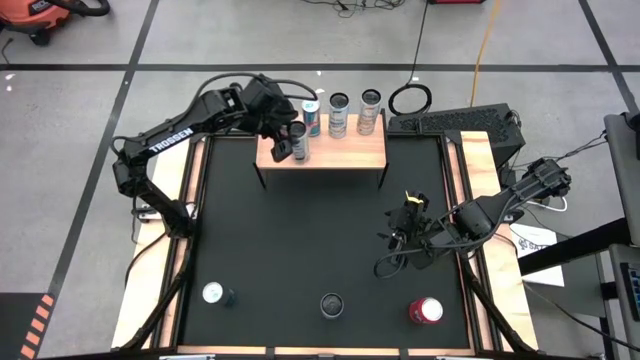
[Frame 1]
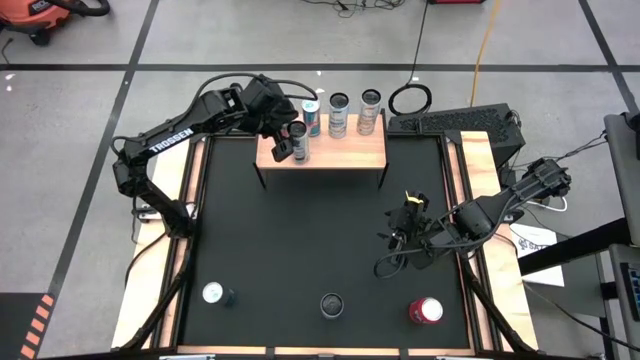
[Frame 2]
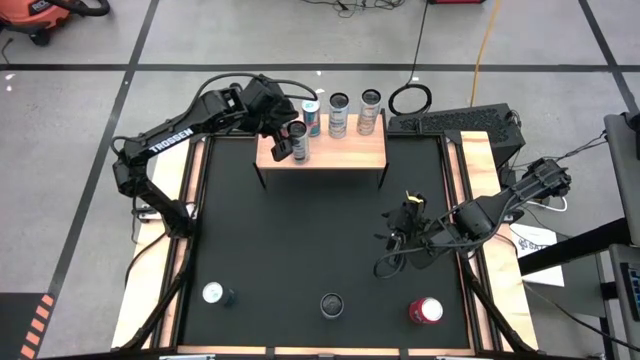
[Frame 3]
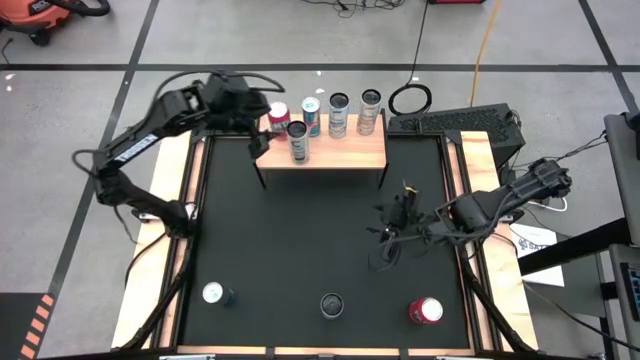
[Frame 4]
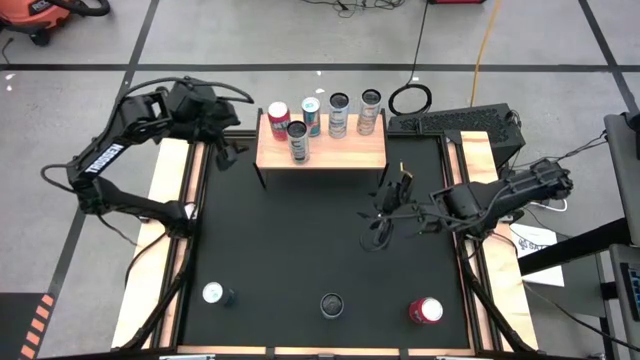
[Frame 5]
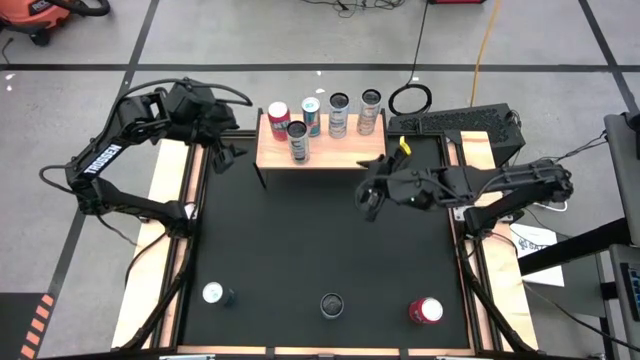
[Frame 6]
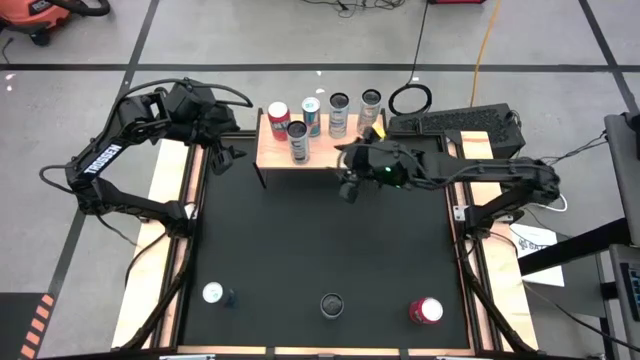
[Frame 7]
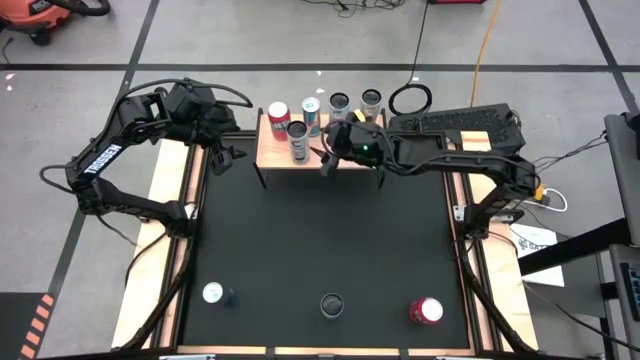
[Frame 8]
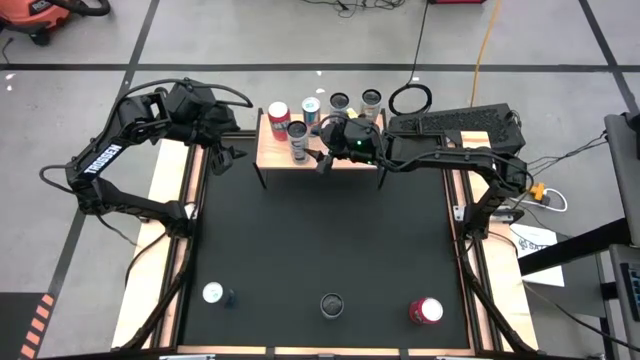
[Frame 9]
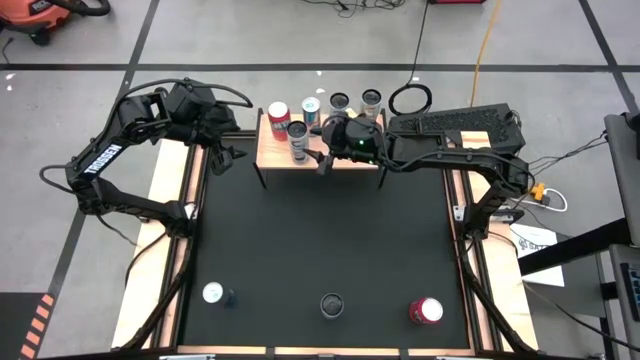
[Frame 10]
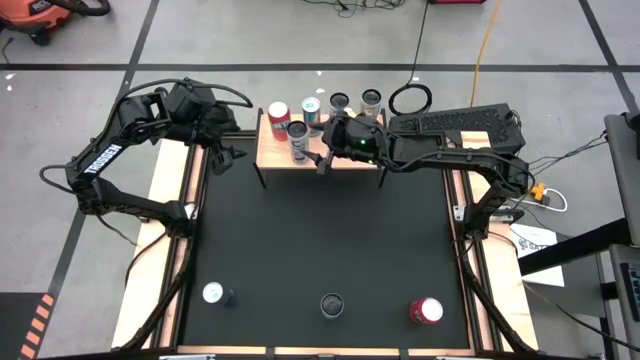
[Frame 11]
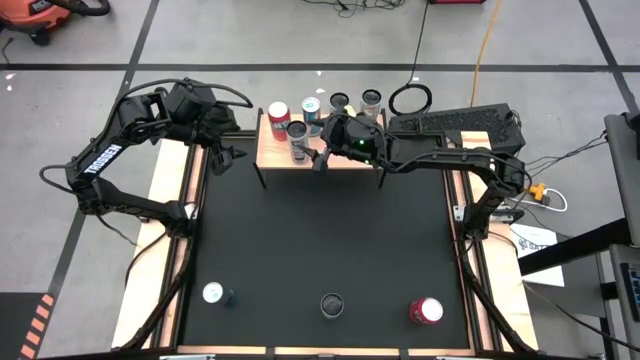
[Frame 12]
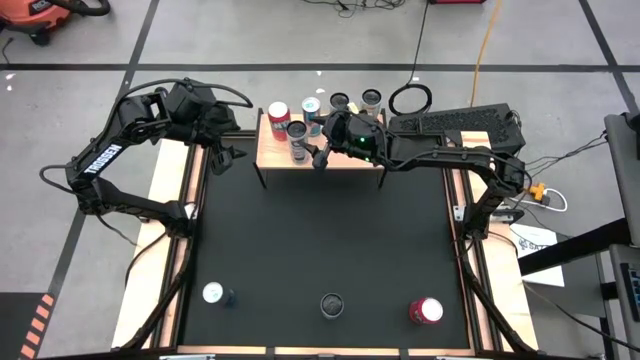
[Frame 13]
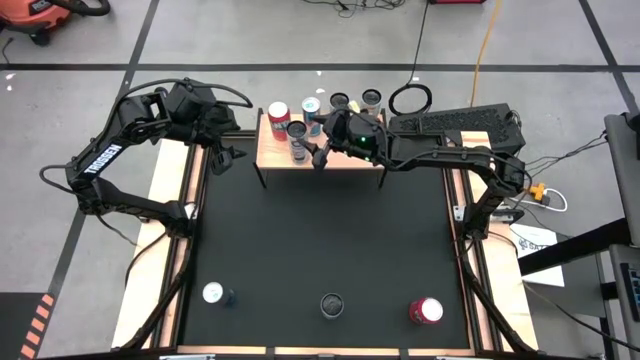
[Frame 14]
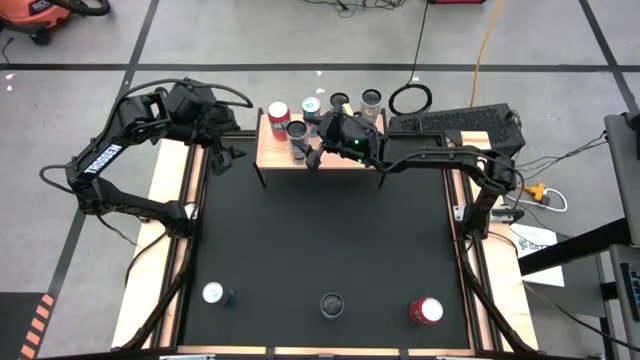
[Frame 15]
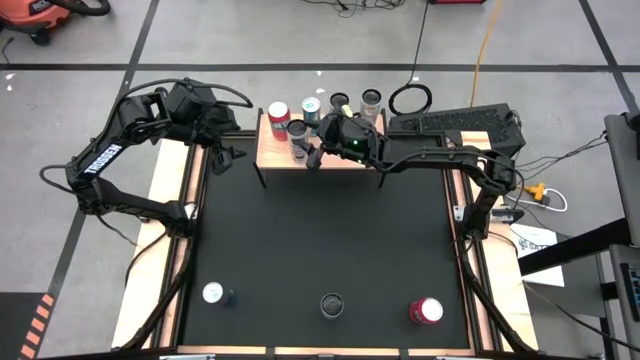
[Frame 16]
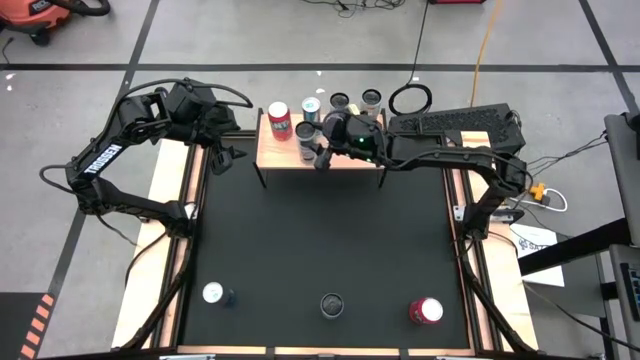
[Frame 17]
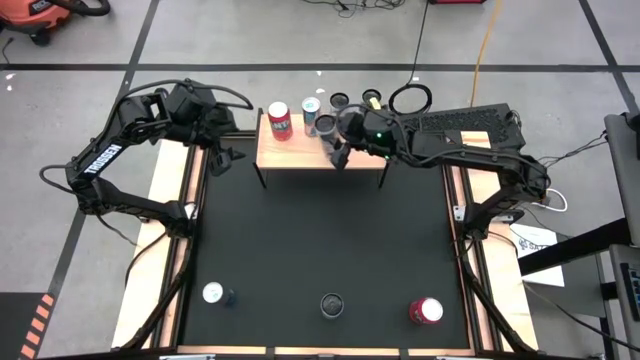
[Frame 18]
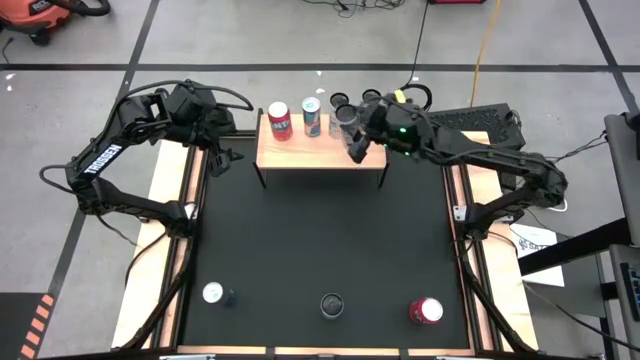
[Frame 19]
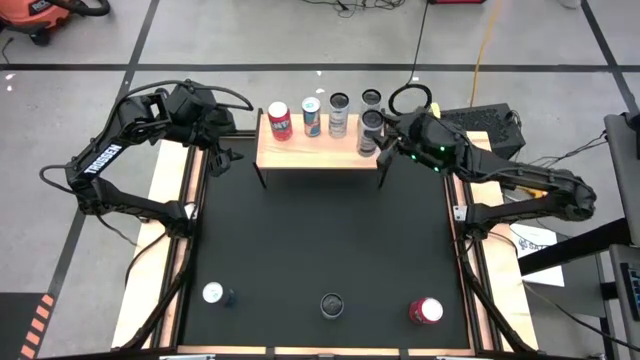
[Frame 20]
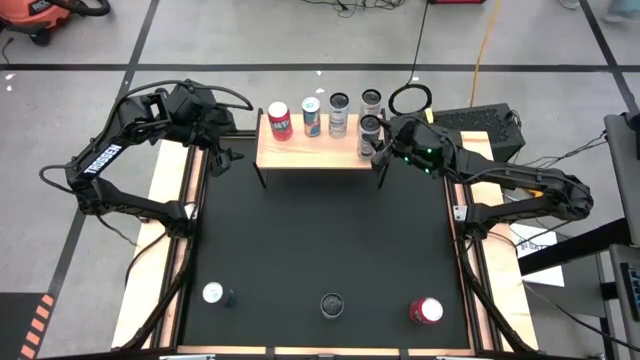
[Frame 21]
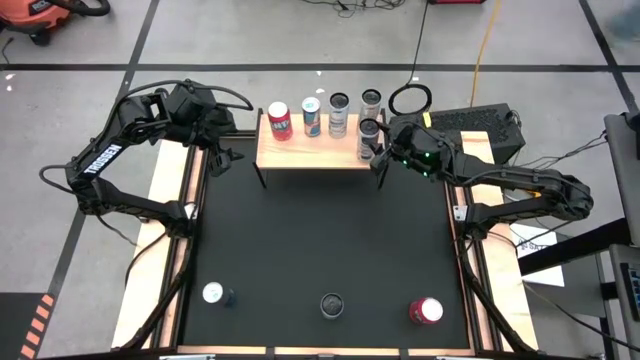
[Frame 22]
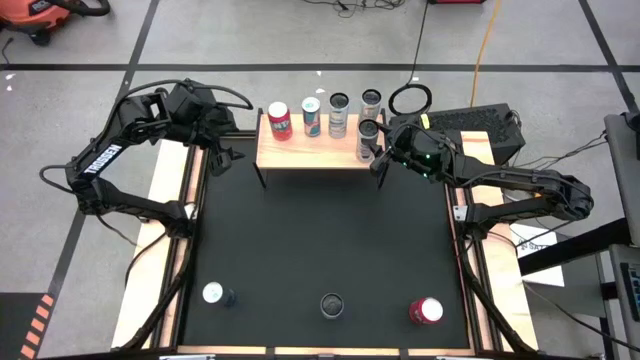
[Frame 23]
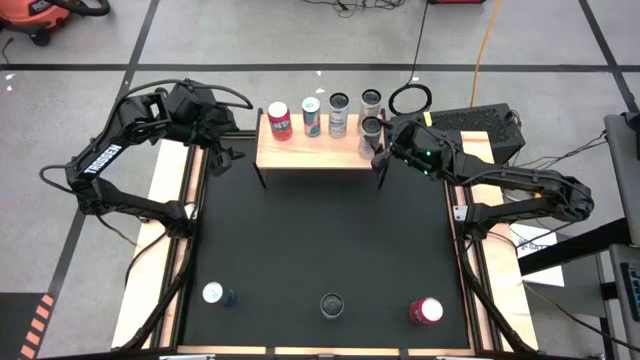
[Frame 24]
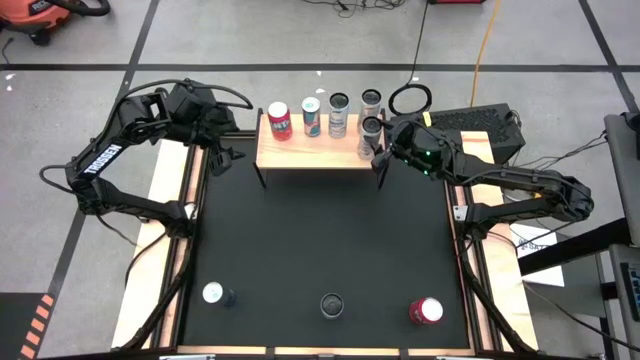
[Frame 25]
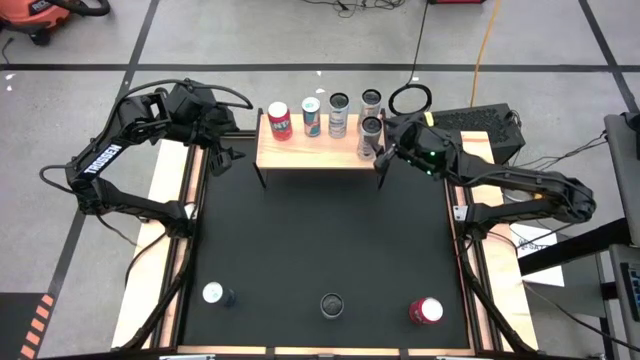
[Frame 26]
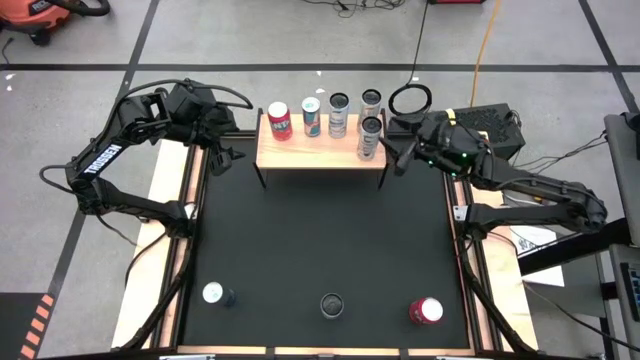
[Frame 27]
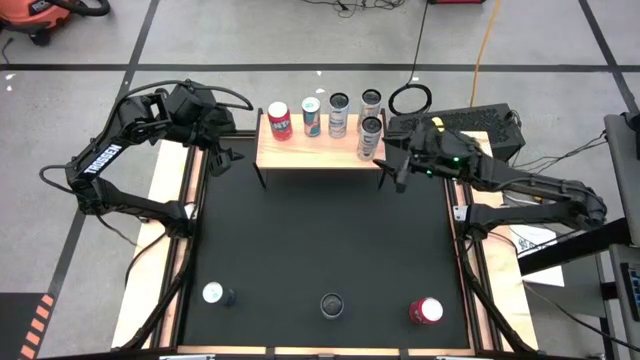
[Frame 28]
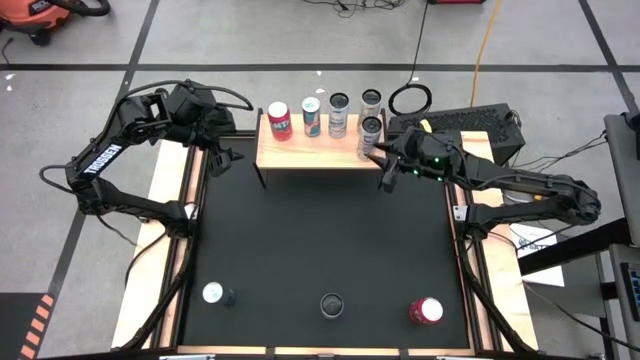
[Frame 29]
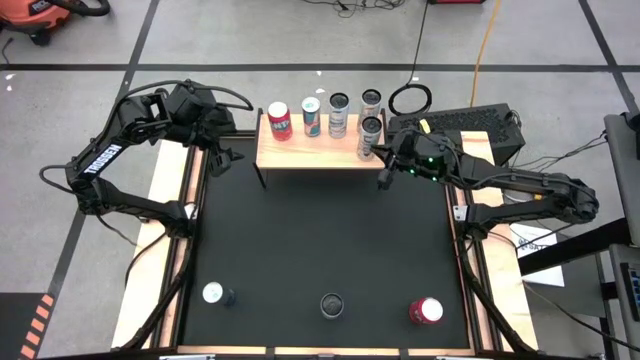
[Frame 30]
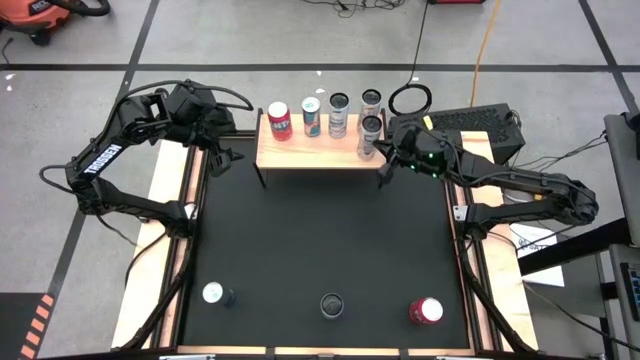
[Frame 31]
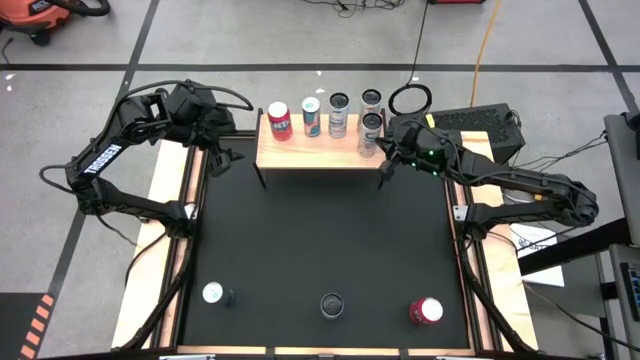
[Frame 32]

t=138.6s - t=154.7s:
Task: Place canned beverage on shelf
Put the white-yellow soda can on the shelf aligned with the other white-yellow soda can

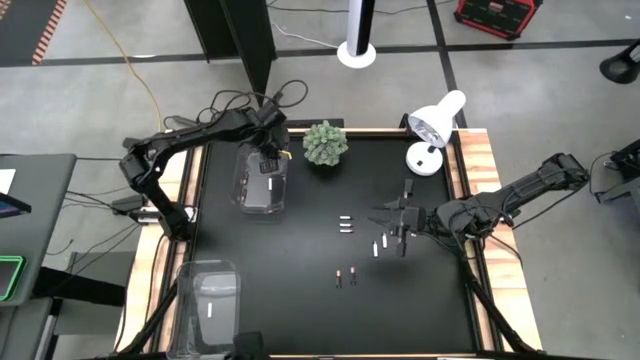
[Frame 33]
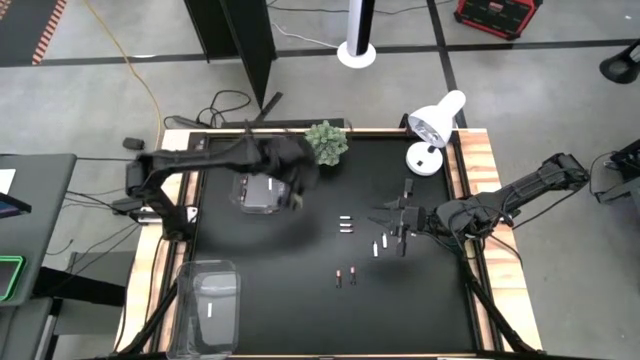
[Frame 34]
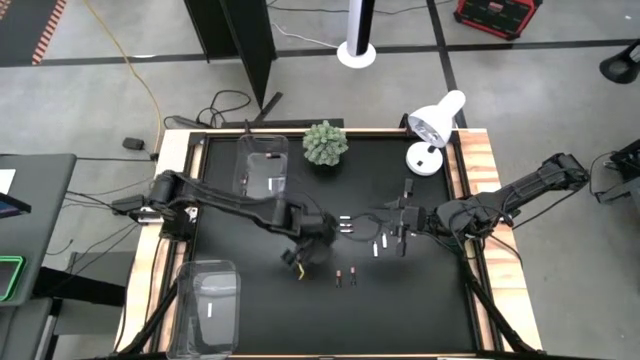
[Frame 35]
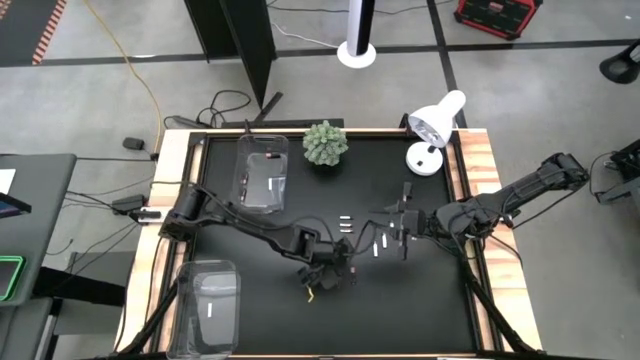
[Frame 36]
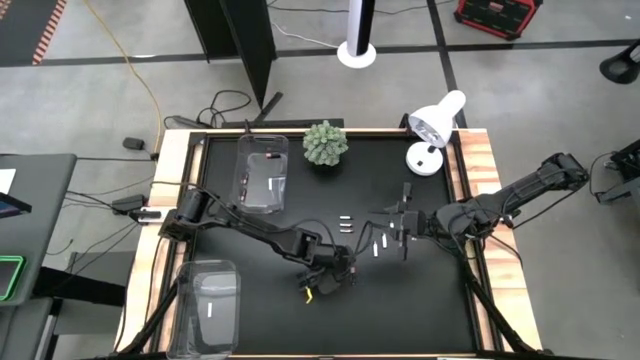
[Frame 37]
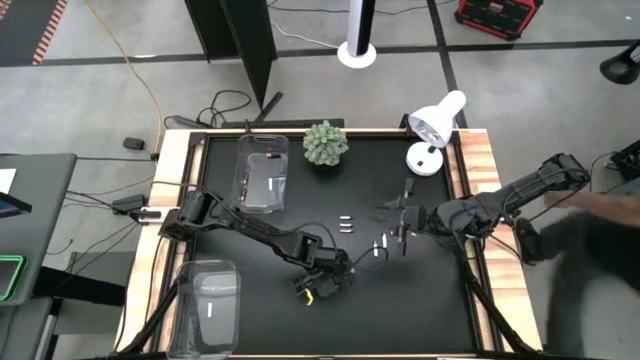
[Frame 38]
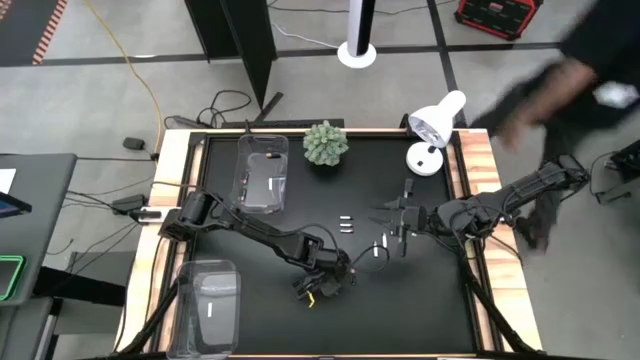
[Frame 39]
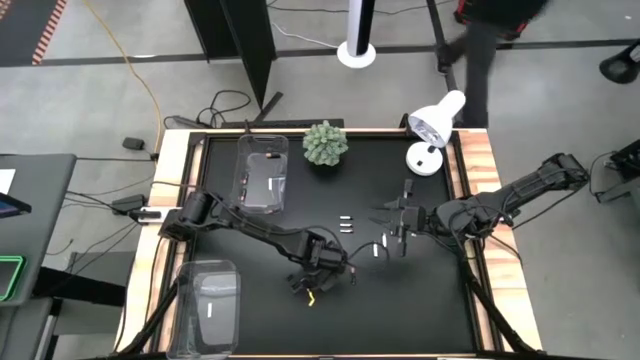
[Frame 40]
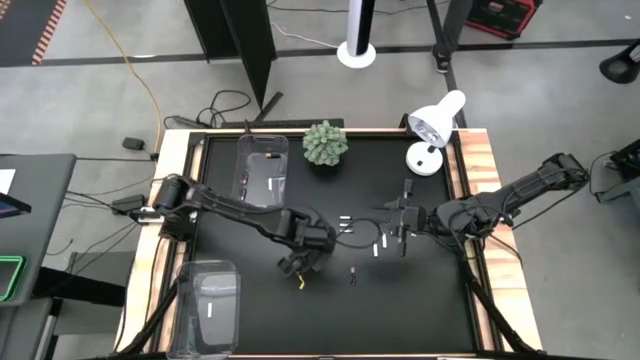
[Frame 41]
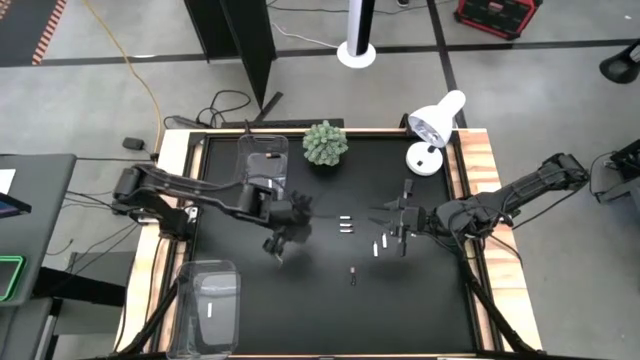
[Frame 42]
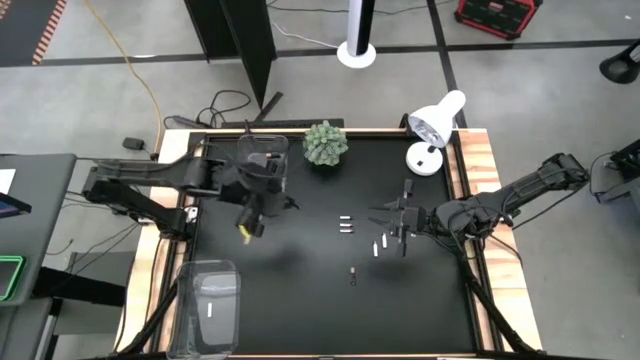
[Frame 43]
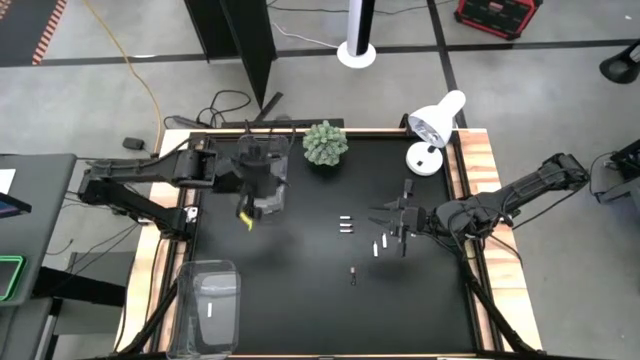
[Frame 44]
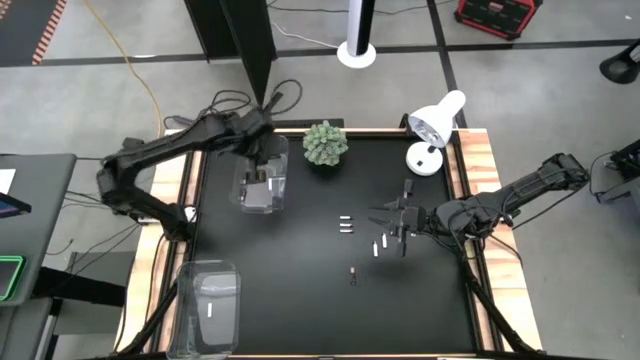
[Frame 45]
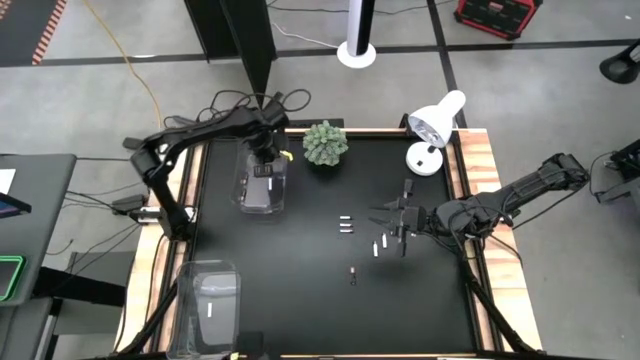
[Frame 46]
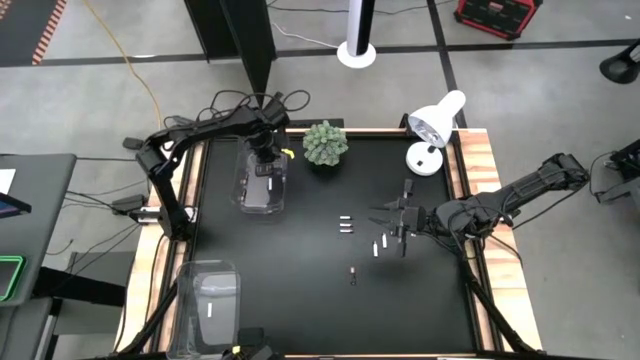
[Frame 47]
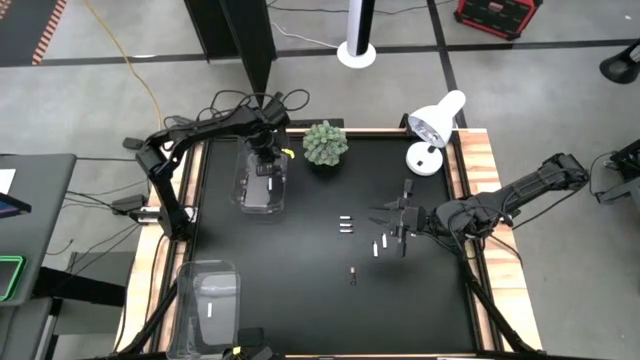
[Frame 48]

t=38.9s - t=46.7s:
Task: Sort batteries
Put the copper and black battery into the top transparent bin
